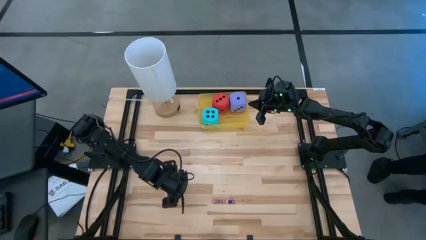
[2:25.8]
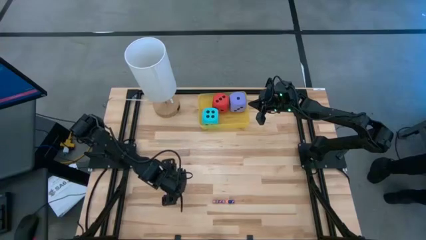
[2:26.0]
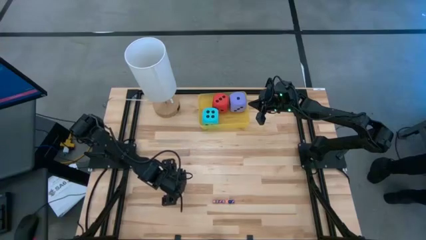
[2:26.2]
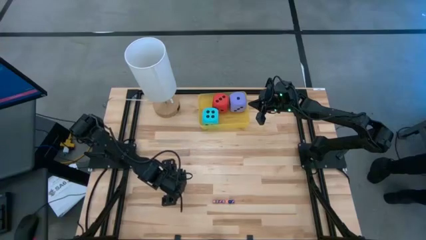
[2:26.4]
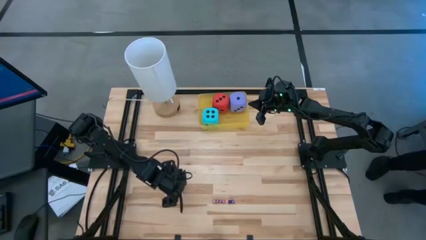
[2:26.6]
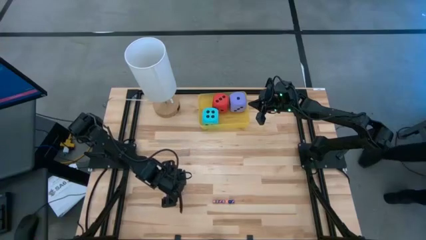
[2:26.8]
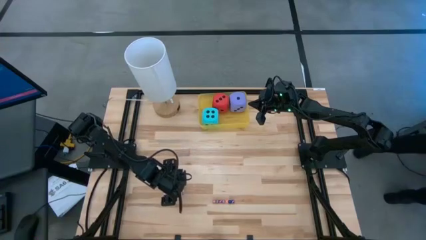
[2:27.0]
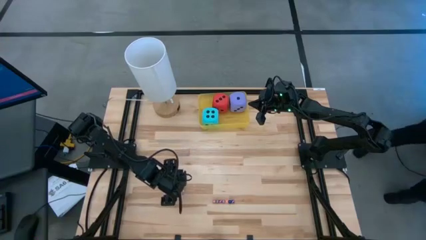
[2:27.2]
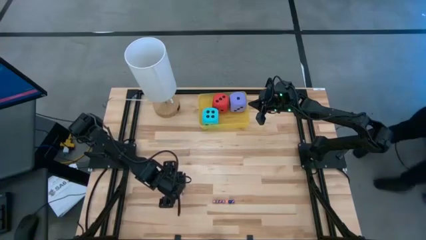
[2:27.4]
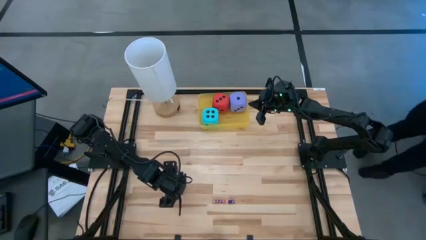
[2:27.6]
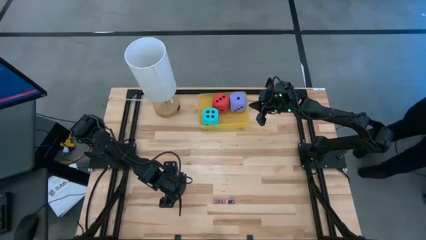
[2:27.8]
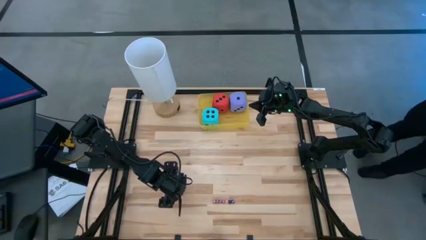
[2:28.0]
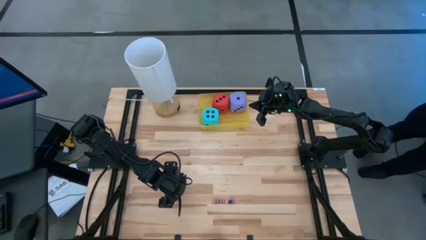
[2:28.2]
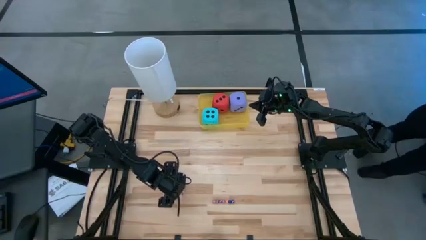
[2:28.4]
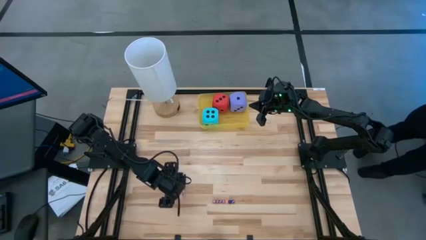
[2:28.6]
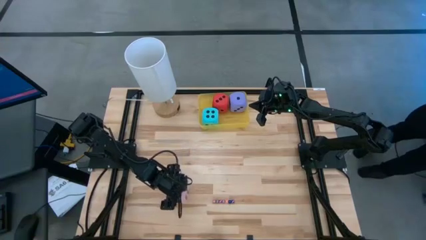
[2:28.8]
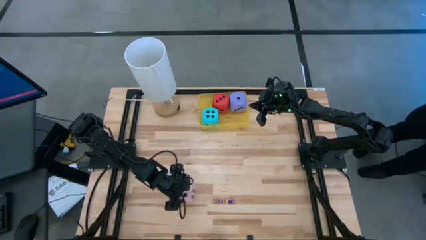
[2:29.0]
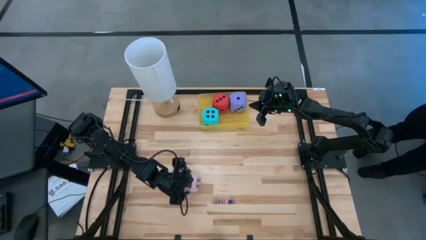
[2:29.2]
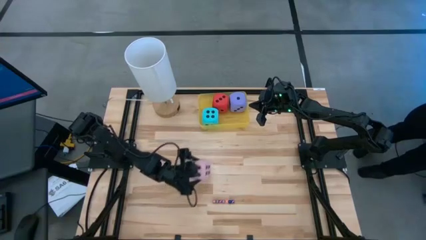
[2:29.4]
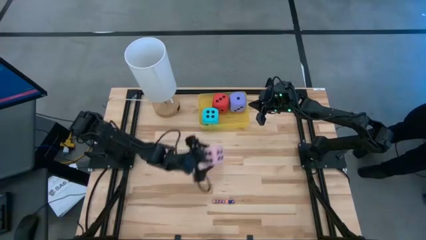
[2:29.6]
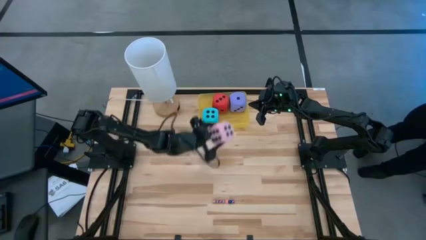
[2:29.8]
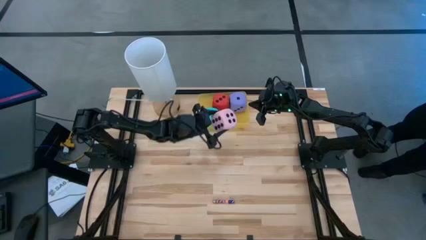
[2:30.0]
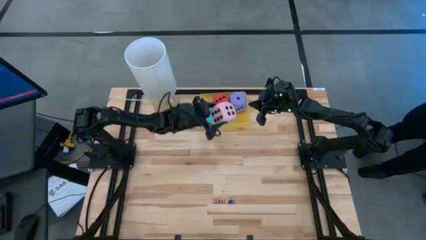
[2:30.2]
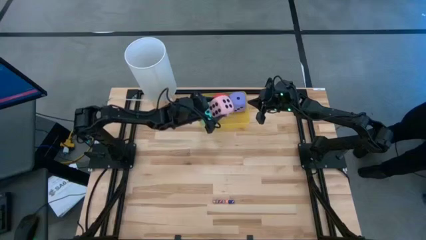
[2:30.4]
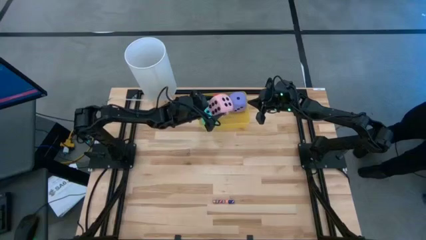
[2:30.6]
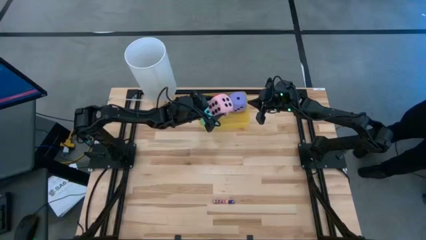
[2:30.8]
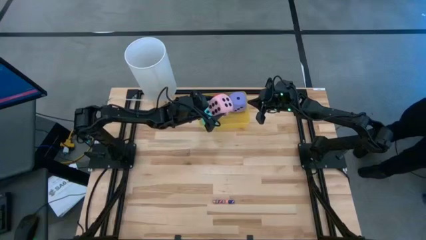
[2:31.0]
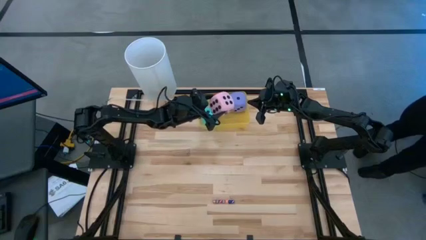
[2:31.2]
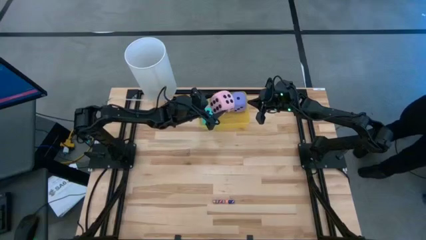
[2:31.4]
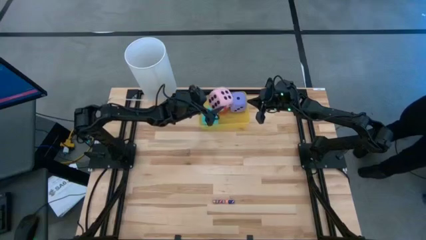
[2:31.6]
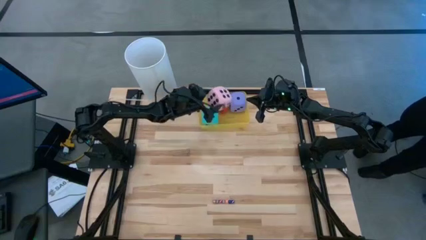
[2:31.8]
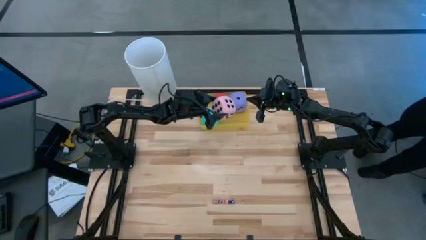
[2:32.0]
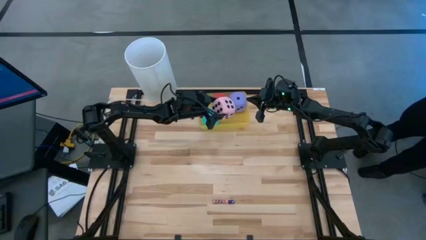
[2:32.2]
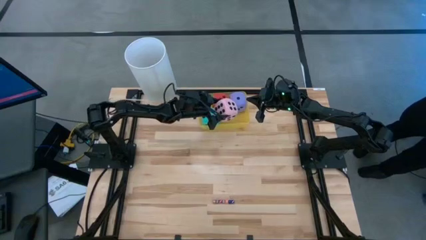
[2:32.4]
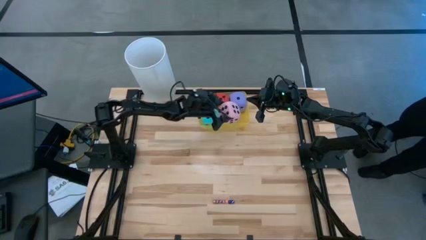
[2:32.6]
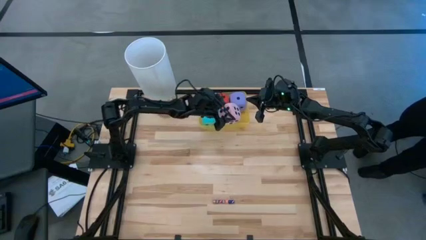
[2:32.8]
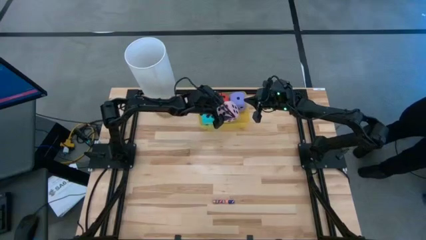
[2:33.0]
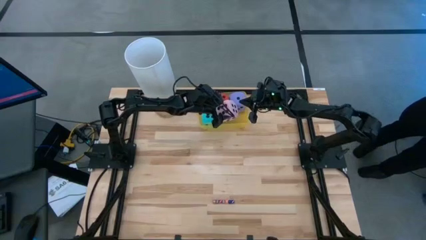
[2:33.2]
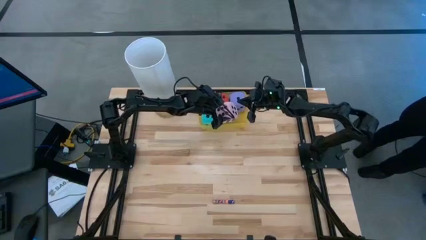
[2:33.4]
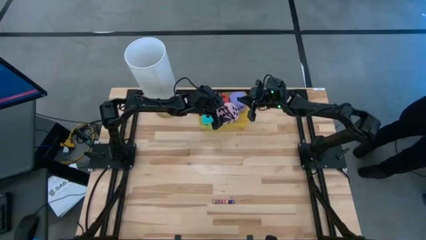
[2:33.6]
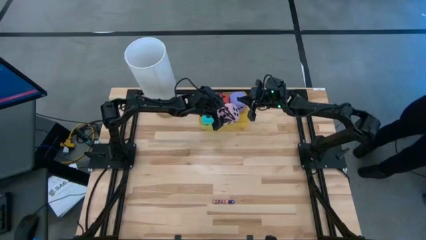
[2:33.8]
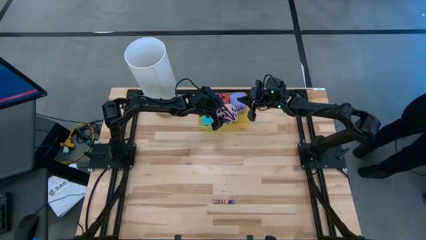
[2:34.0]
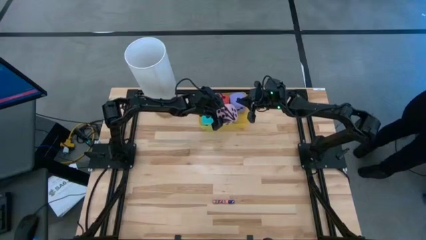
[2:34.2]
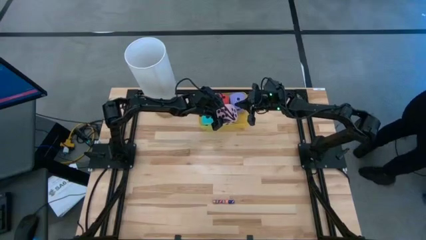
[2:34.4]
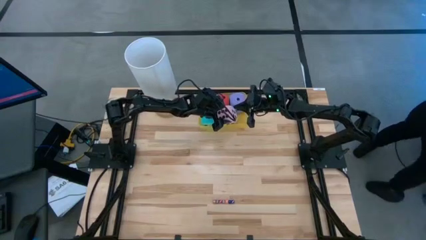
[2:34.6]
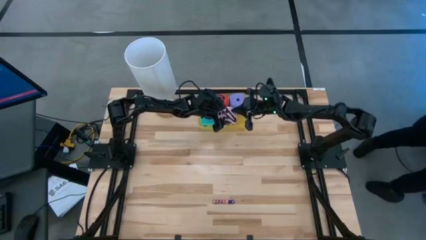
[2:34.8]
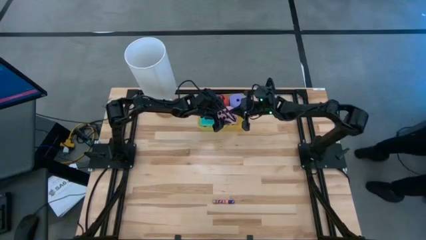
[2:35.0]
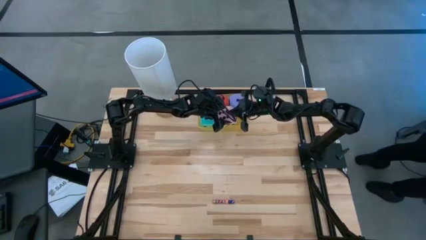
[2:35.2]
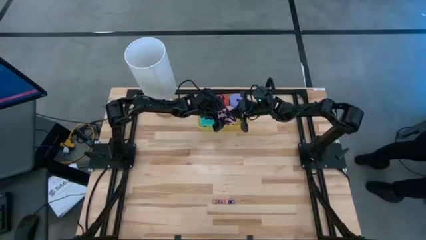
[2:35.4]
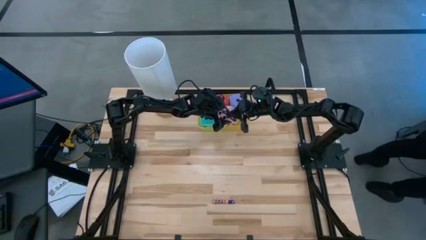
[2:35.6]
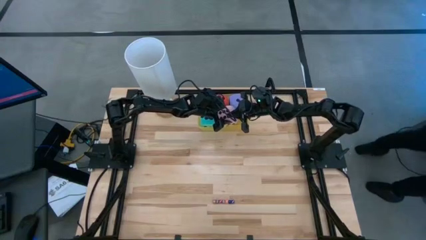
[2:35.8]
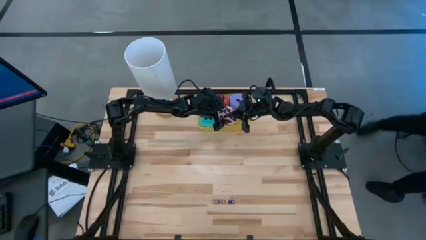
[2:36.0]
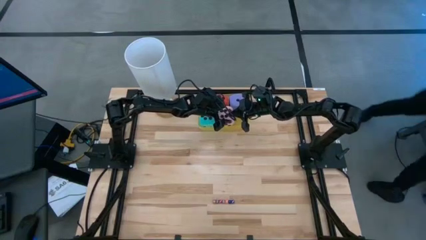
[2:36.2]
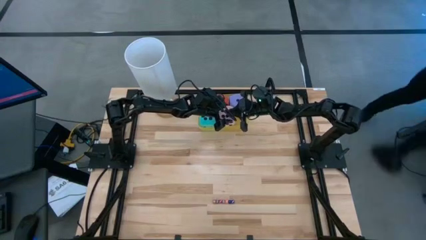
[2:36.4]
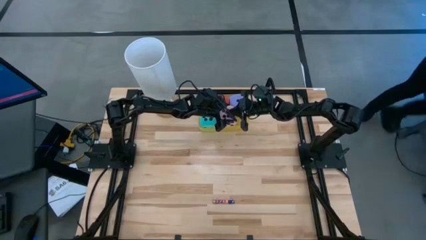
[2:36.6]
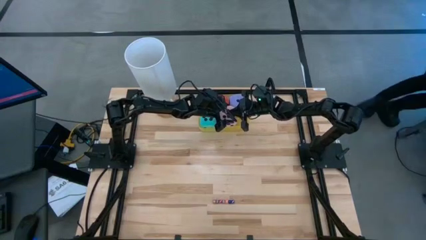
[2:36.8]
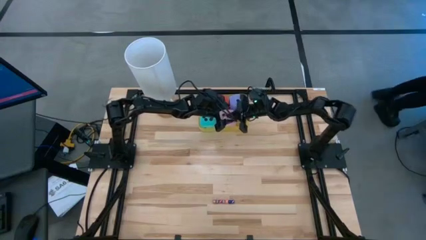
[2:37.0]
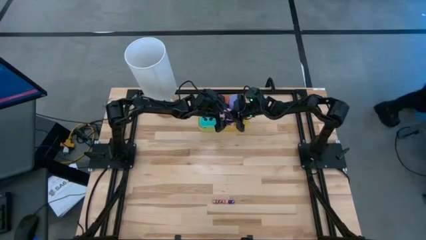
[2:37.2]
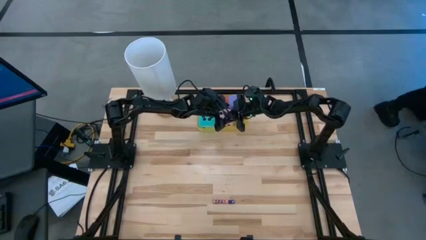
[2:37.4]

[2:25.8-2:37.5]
Task: Pick & Place Dice
Put the big pink dice into the yellow bin

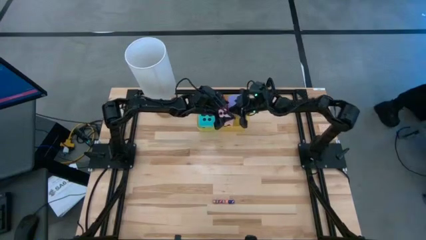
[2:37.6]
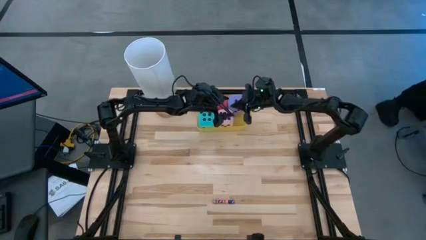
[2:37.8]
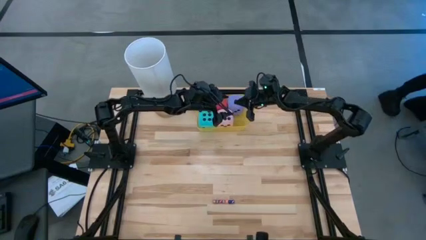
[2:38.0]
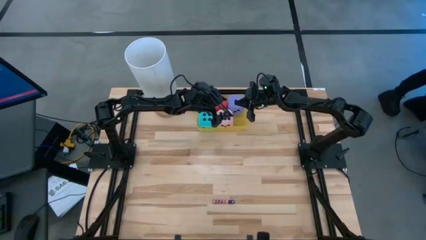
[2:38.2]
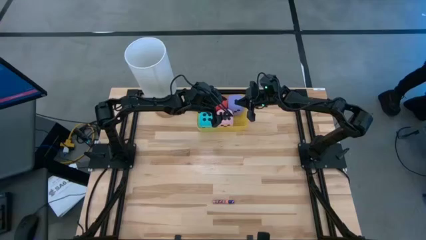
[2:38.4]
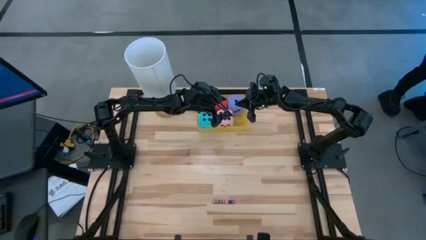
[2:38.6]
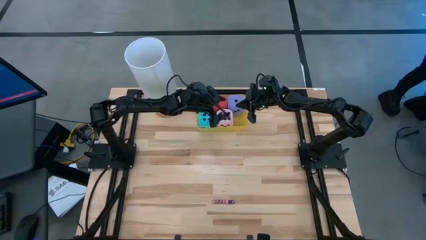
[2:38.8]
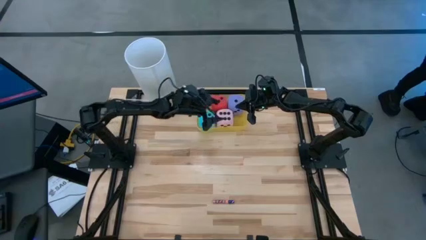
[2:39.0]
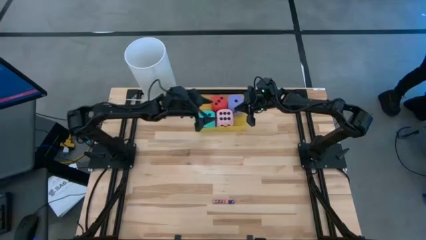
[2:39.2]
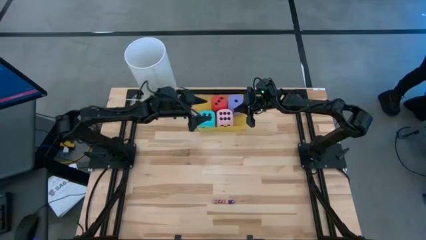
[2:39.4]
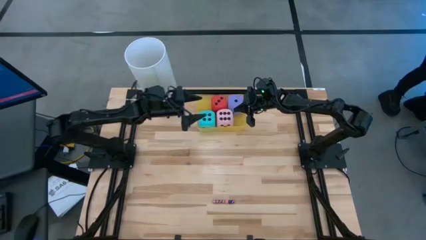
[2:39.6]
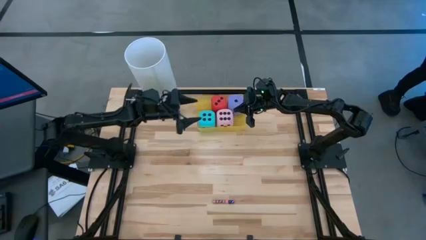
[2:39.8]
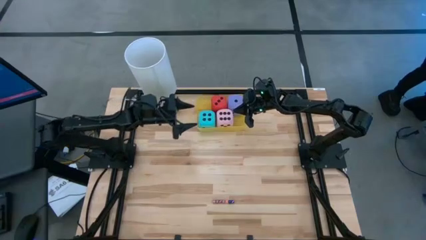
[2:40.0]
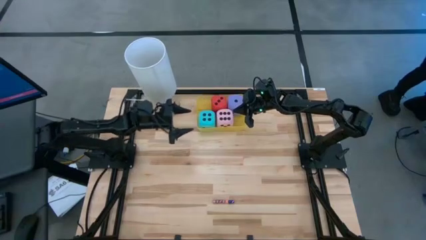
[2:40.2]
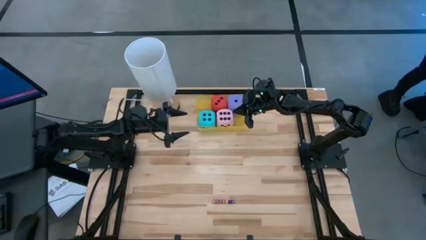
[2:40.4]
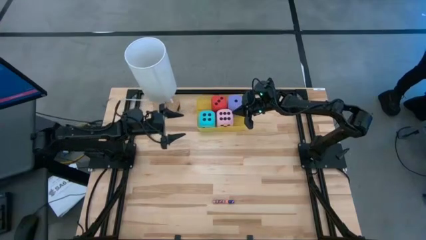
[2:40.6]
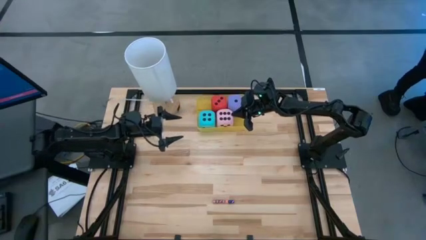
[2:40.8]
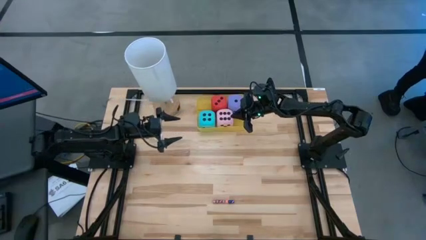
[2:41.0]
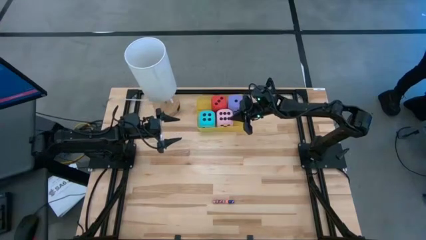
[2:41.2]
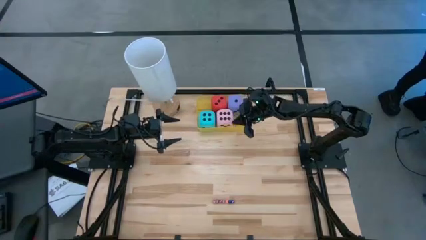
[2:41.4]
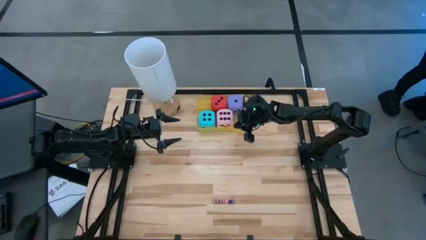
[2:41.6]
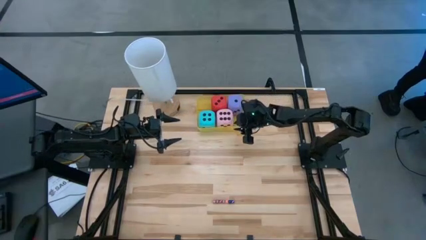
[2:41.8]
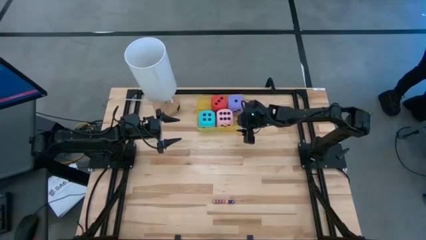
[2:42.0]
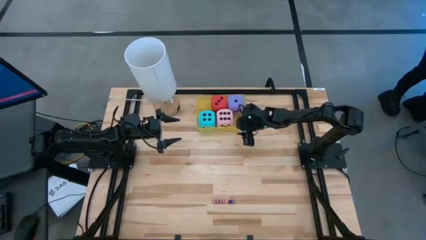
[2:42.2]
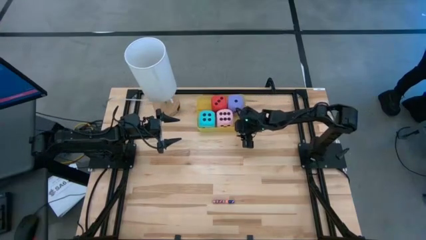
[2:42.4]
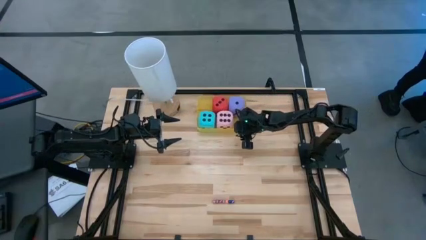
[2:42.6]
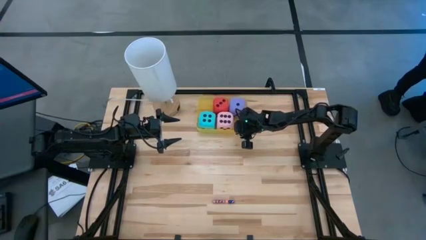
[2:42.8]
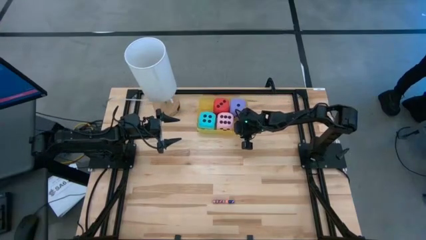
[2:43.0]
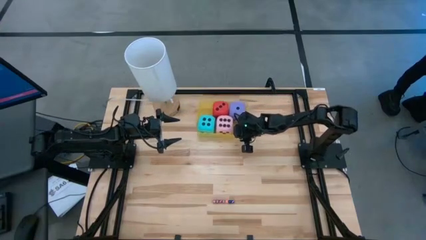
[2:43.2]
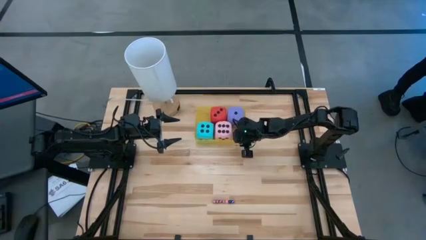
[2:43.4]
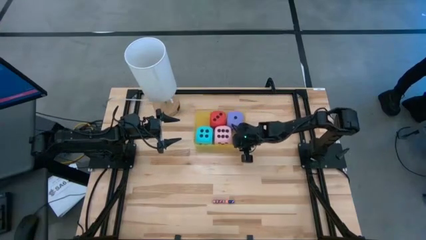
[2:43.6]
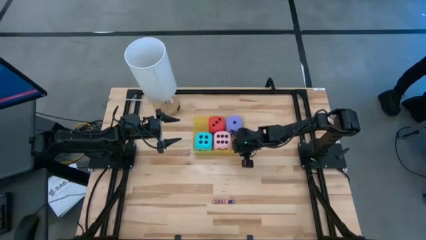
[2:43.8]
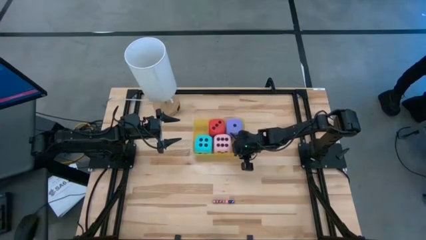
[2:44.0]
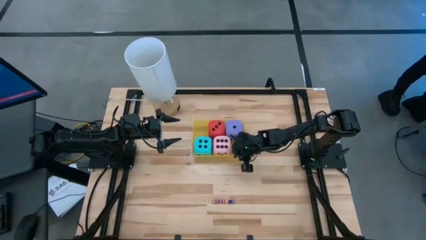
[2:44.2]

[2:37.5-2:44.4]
Adjust the yellow bin
